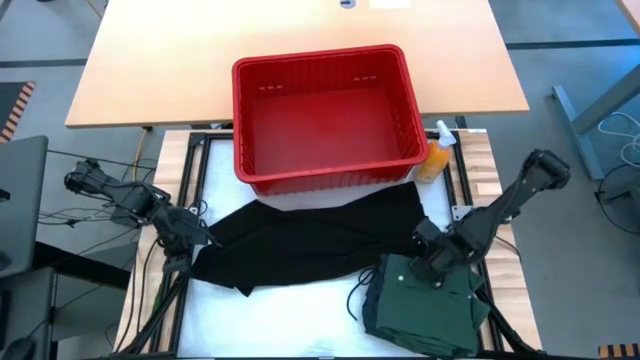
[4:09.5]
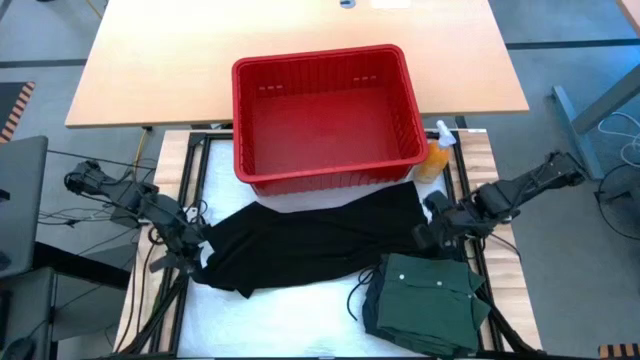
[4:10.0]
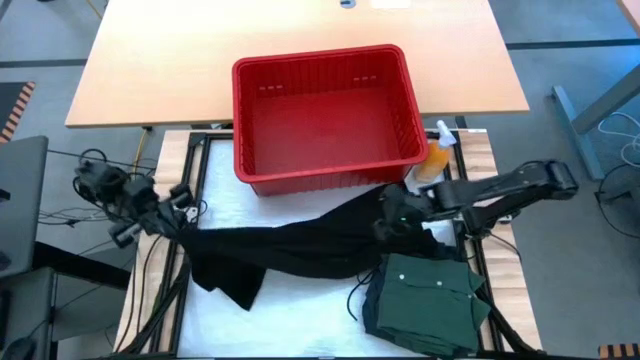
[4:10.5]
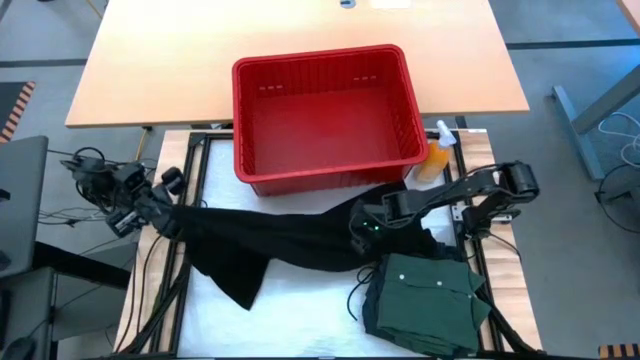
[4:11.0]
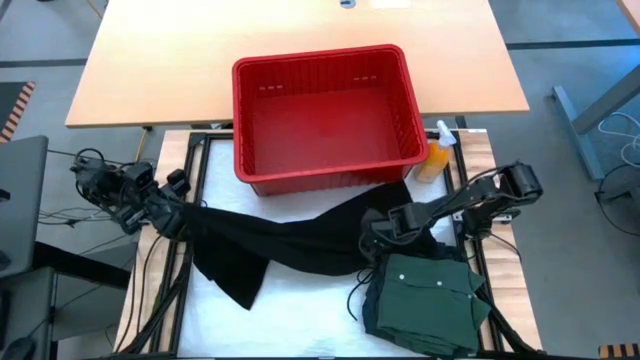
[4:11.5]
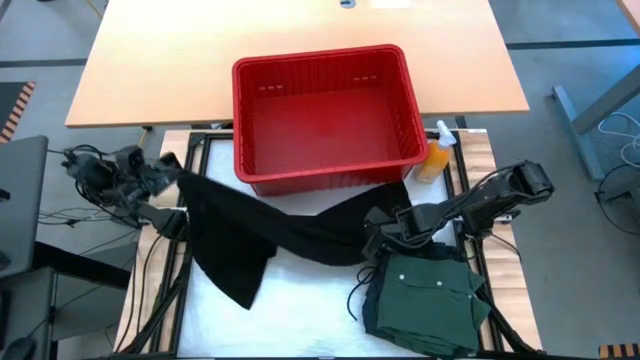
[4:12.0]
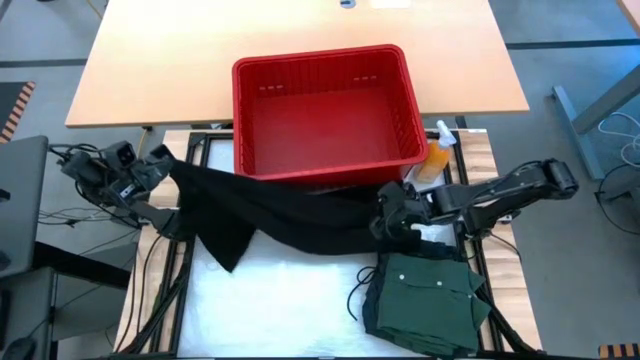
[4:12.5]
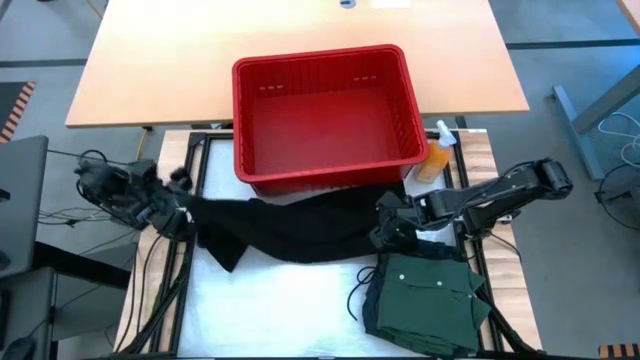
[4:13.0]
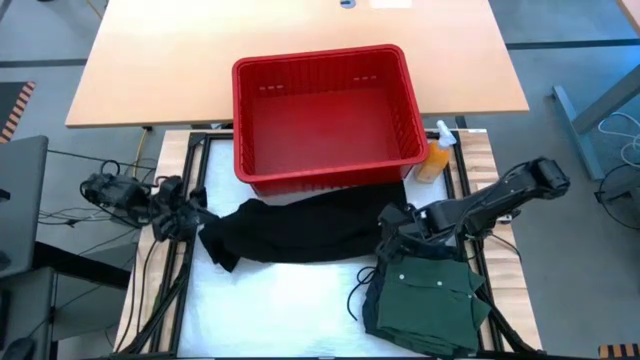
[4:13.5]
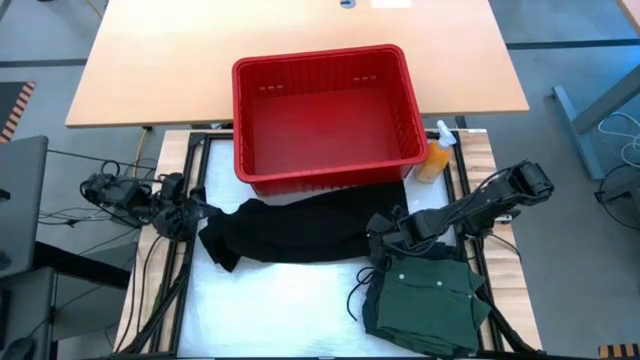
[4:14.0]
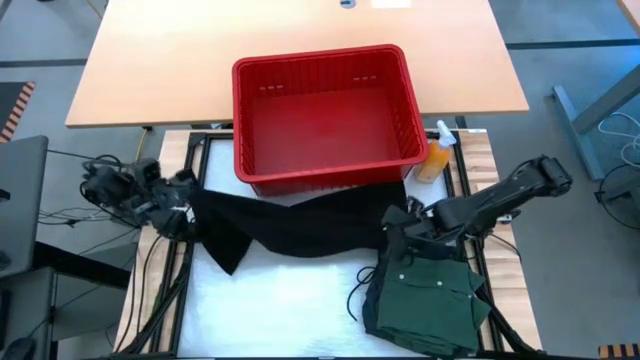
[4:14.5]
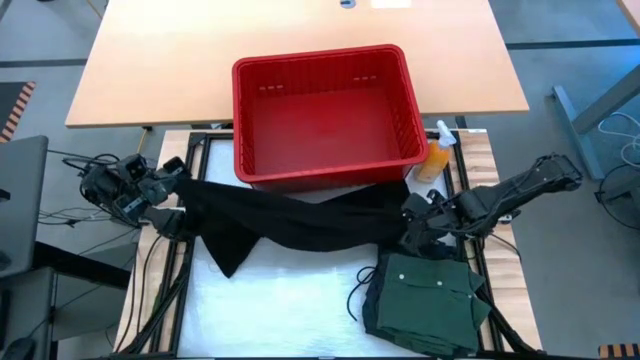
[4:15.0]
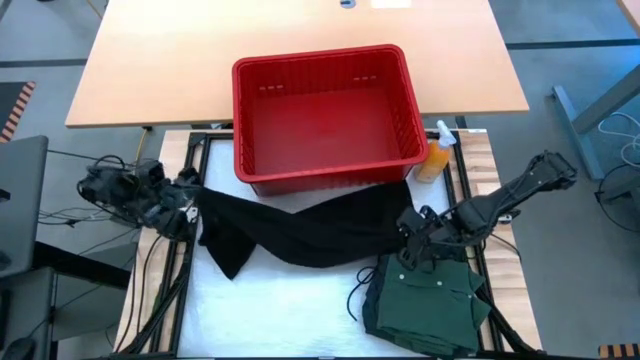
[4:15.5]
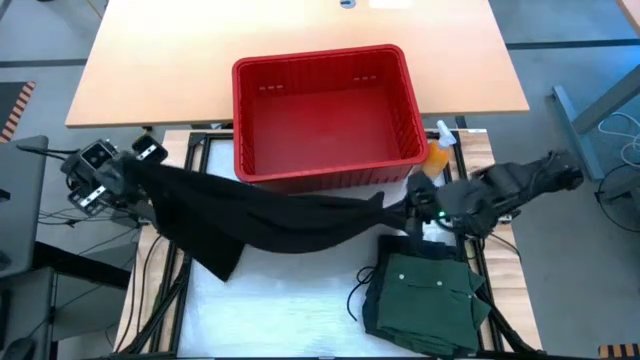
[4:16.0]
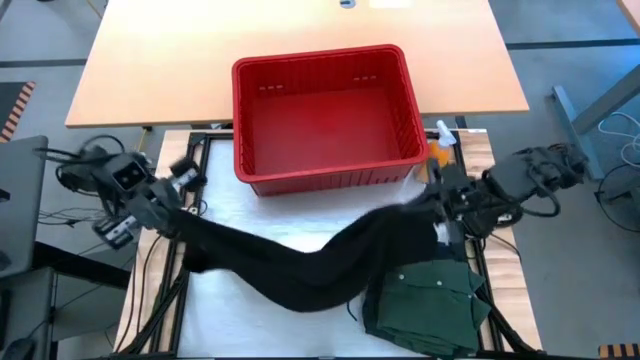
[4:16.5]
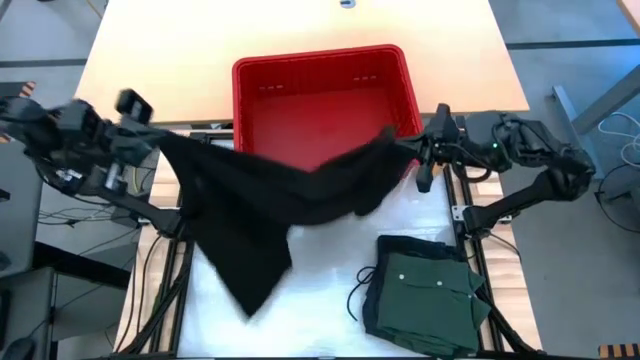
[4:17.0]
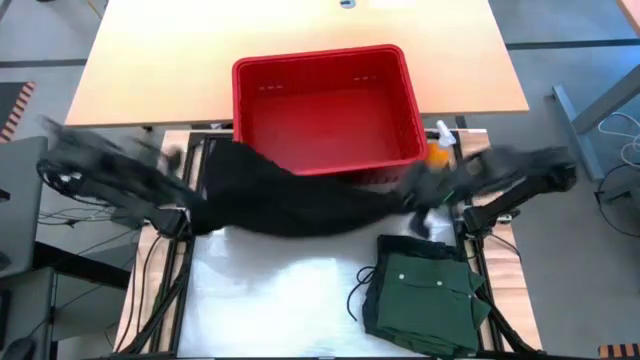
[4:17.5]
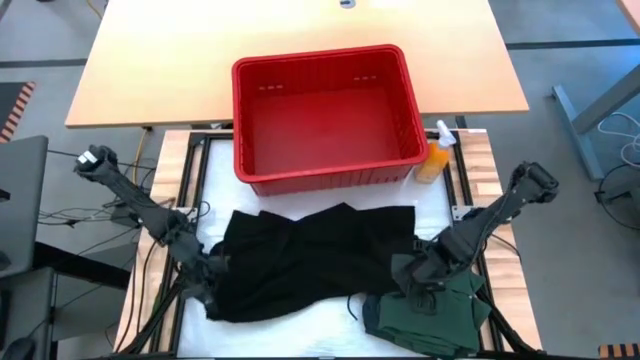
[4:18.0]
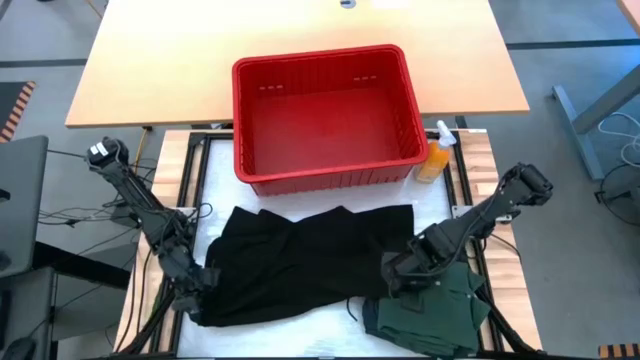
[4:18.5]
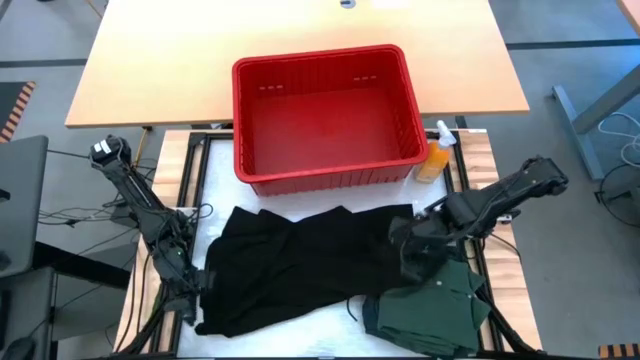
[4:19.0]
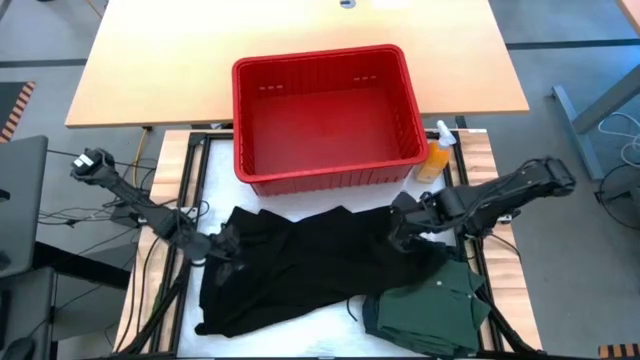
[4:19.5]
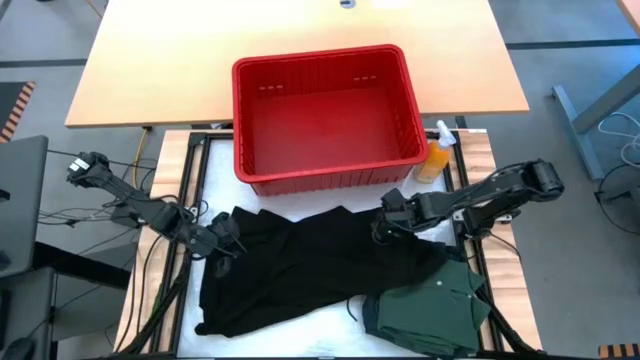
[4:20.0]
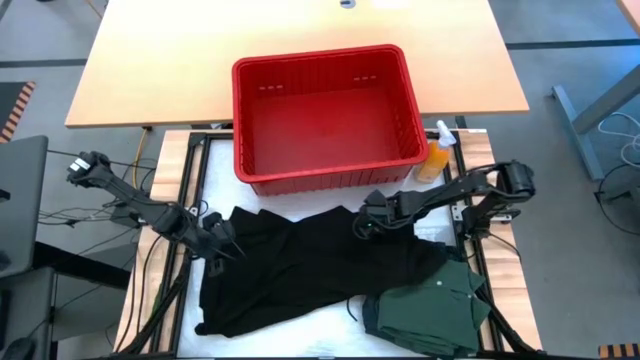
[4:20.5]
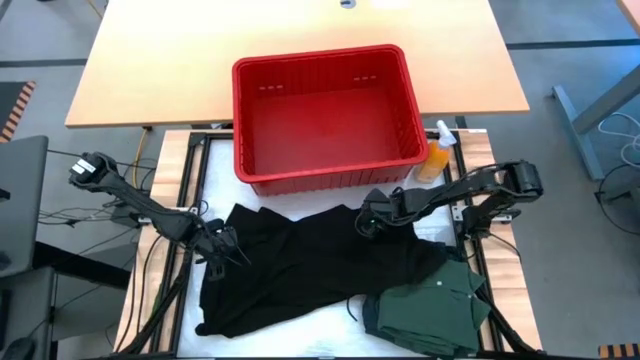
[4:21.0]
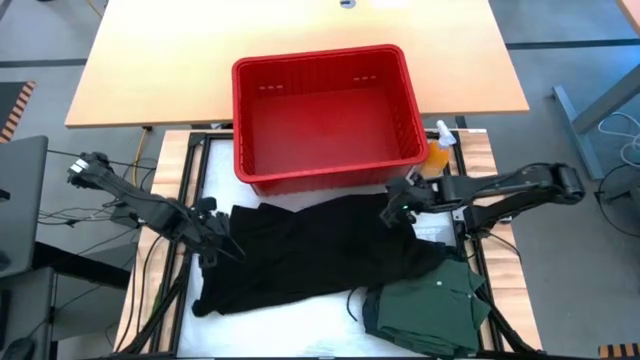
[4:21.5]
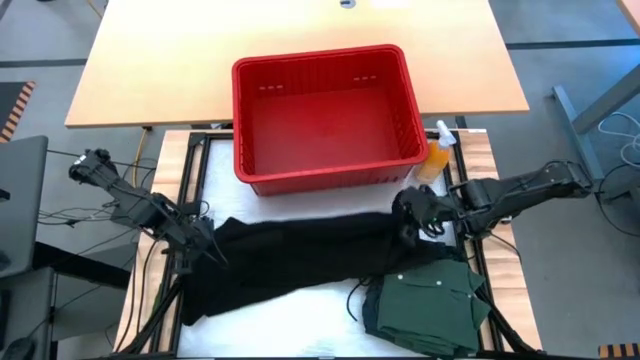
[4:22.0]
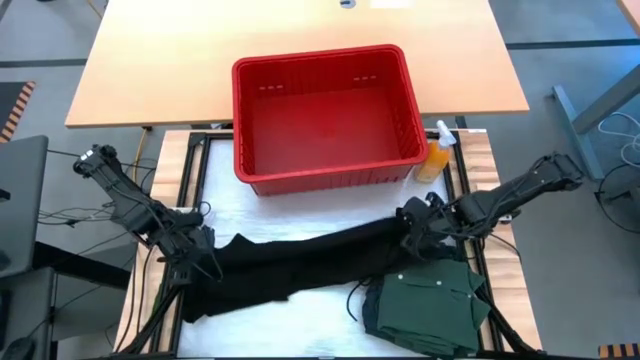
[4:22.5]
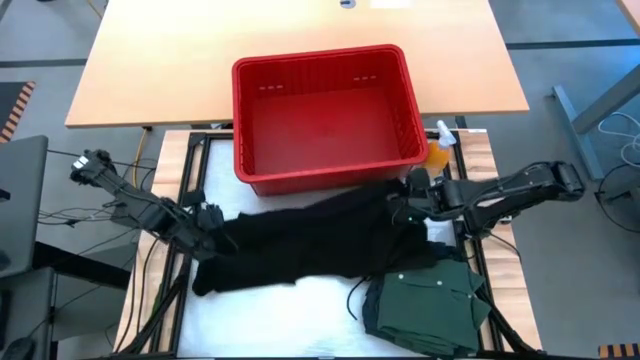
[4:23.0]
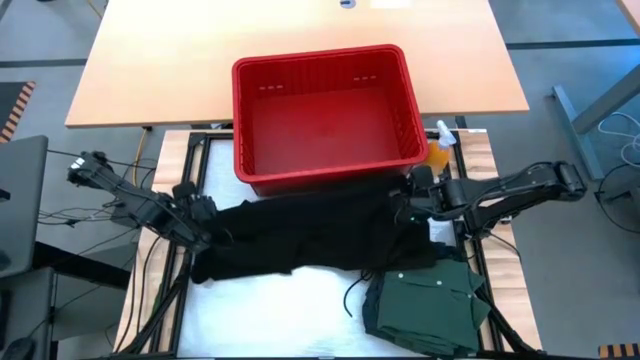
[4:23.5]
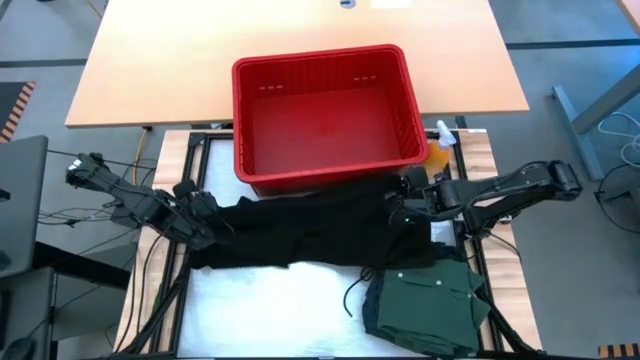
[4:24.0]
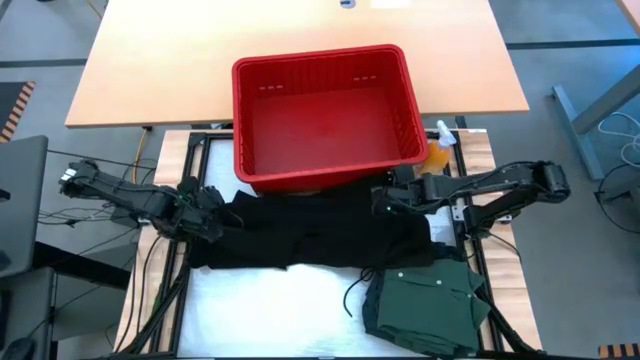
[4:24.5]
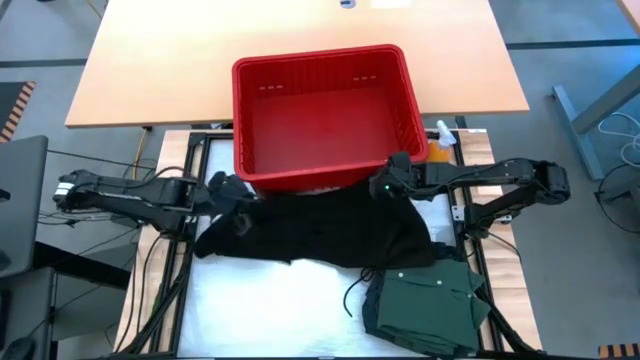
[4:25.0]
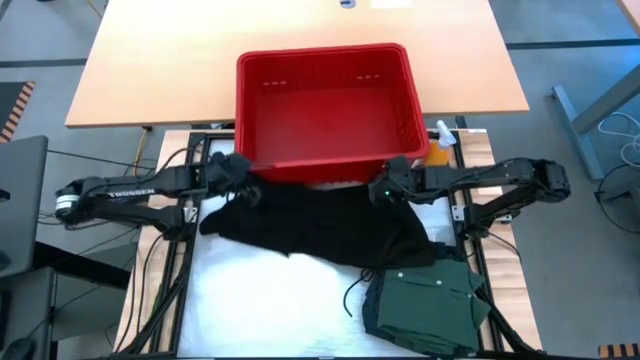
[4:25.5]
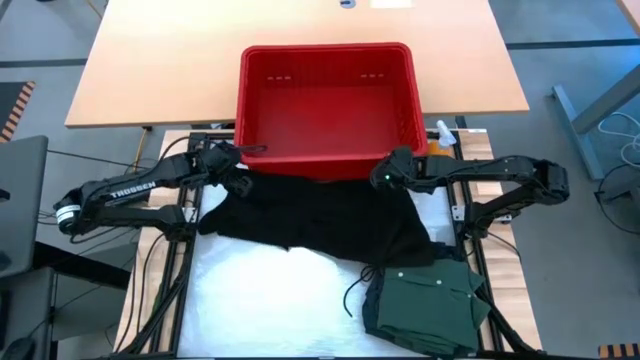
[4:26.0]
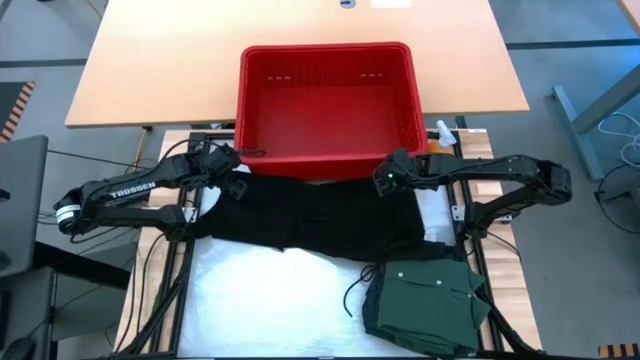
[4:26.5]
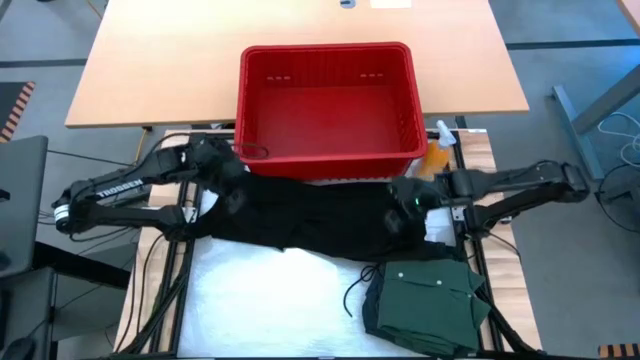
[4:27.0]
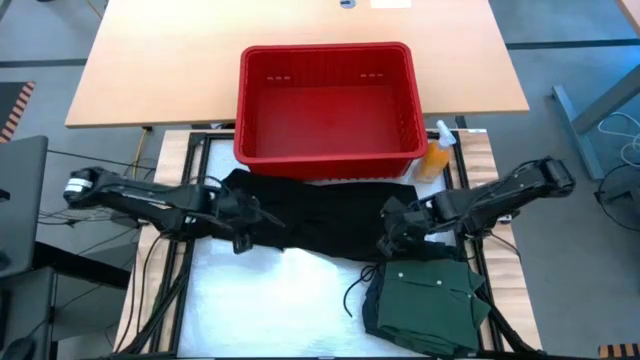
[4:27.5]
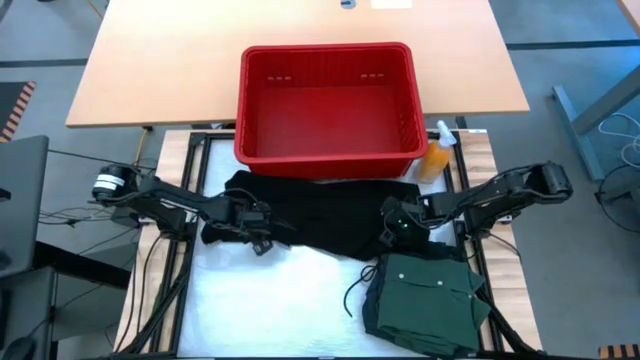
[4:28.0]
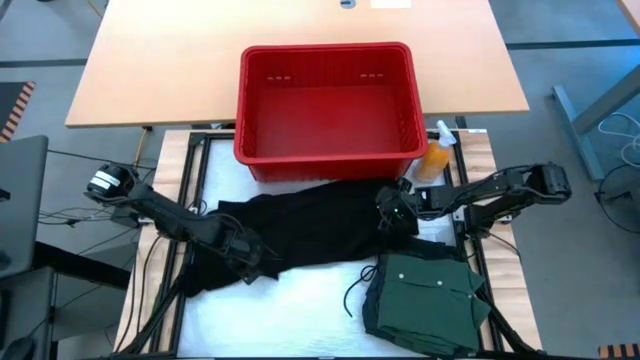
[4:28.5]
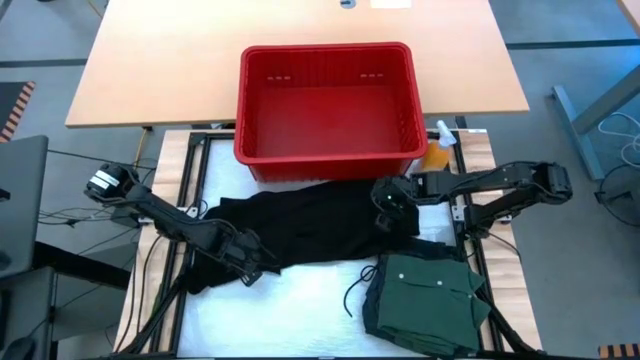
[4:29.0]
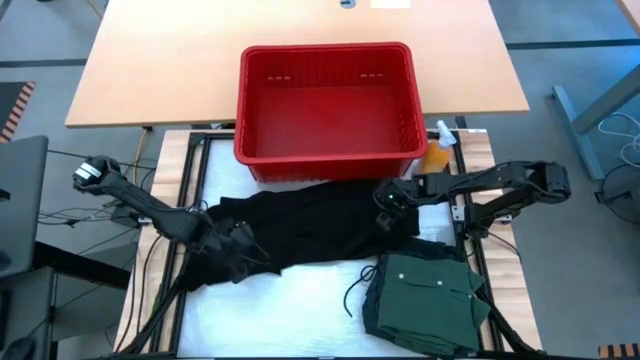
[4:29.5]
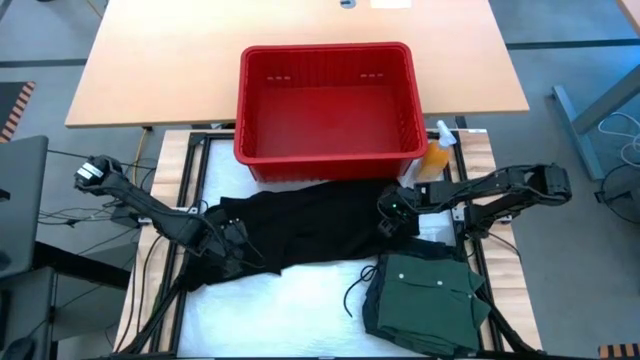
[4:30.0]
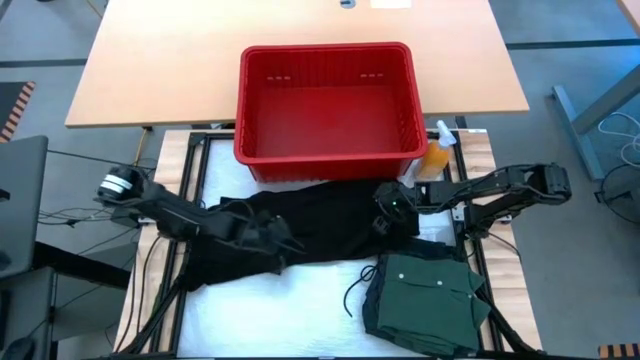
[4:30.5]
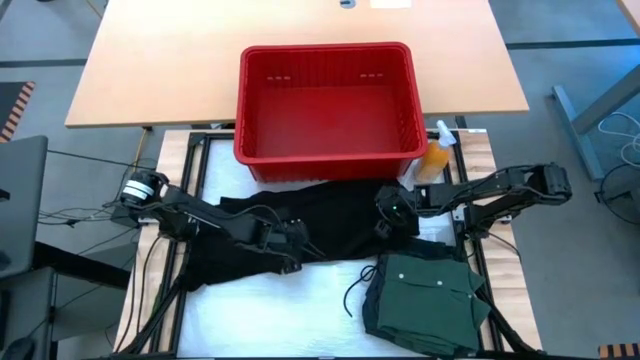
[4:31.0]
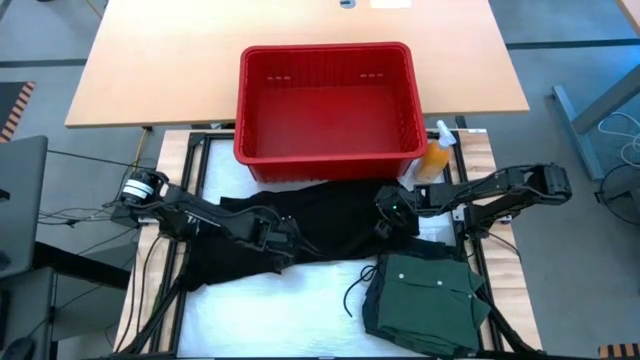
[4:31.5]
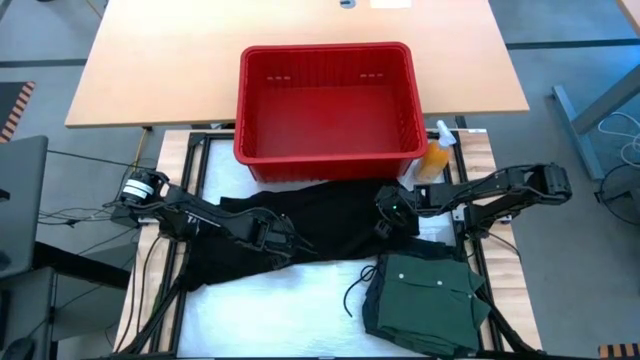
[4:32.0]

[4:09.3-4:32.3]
Task: Fold laundry
Fold the black shirt
